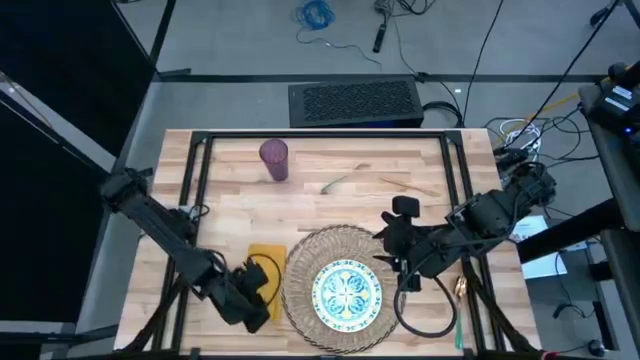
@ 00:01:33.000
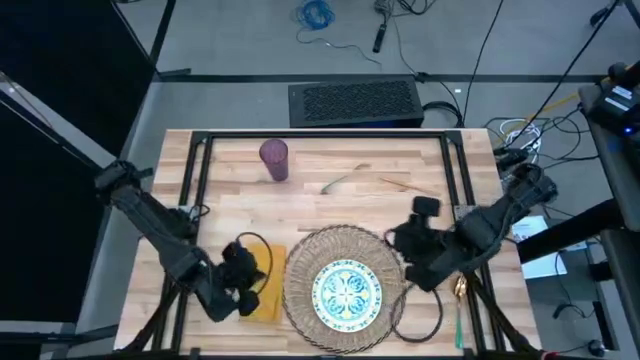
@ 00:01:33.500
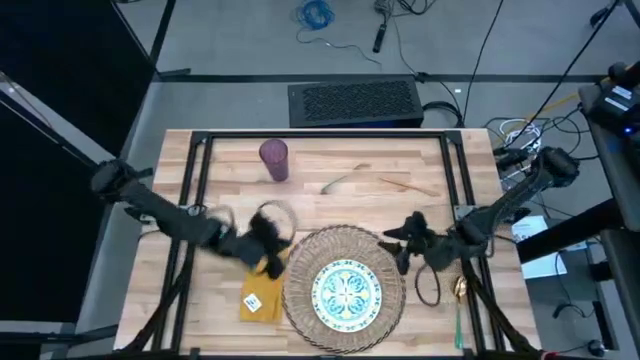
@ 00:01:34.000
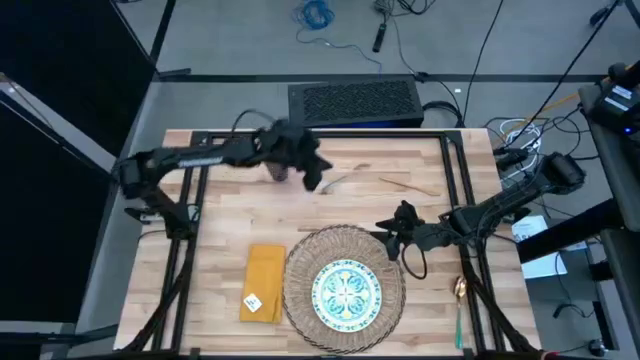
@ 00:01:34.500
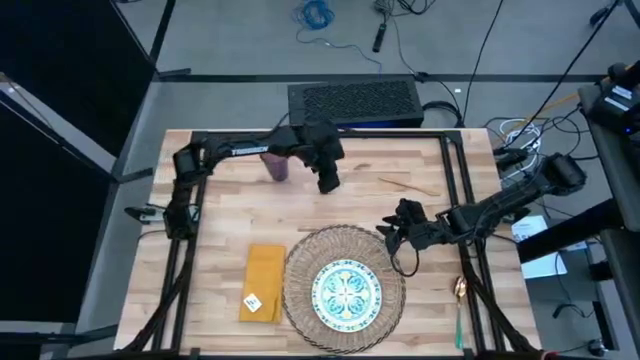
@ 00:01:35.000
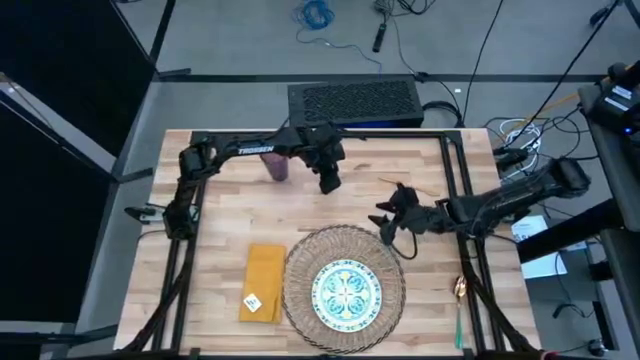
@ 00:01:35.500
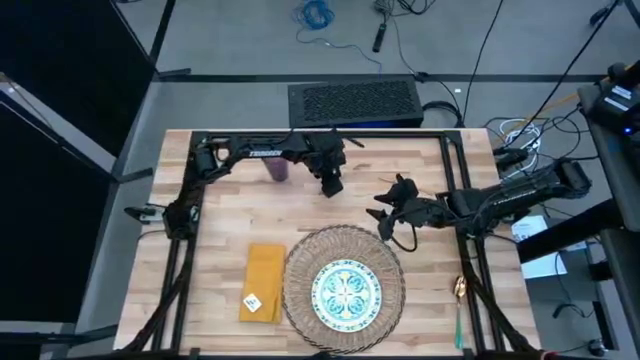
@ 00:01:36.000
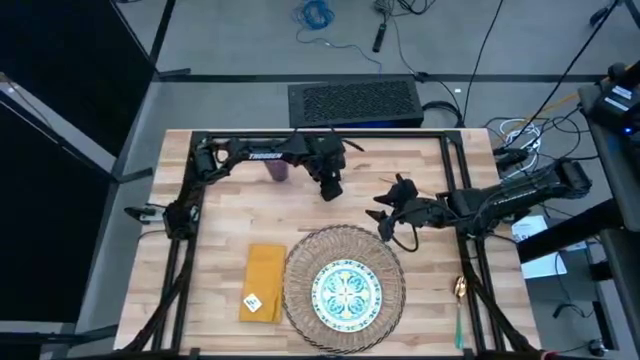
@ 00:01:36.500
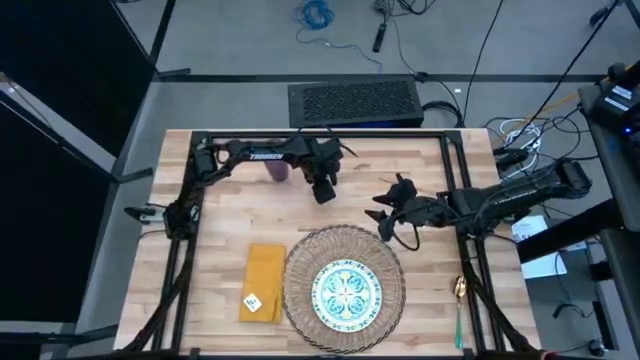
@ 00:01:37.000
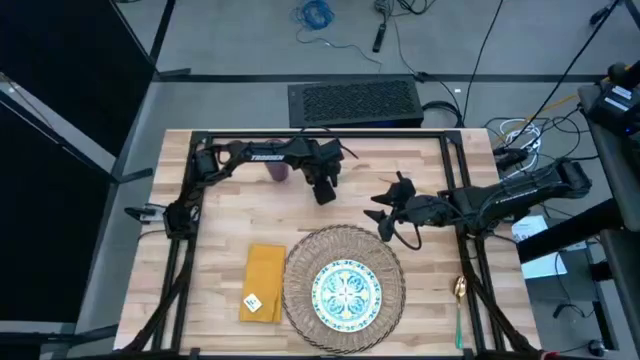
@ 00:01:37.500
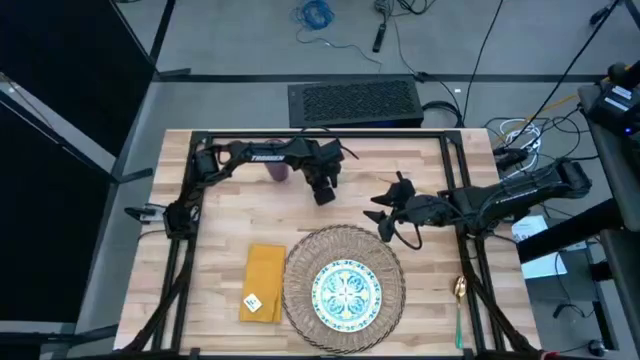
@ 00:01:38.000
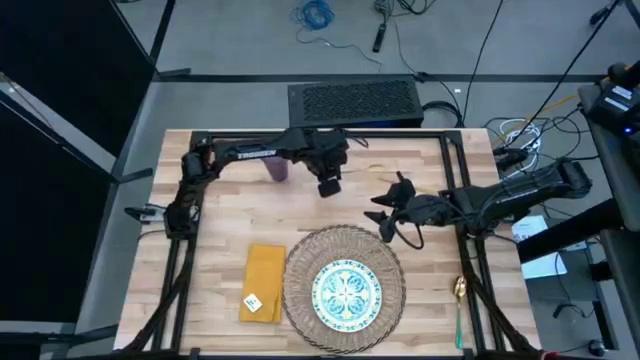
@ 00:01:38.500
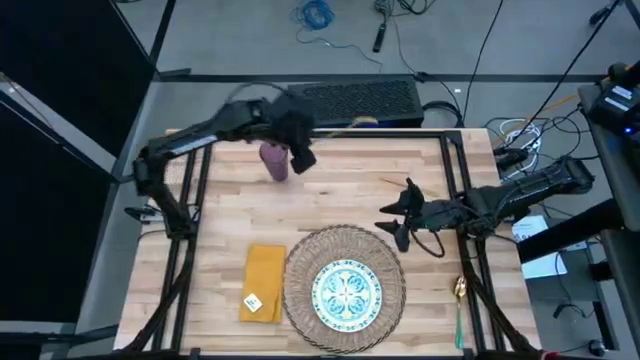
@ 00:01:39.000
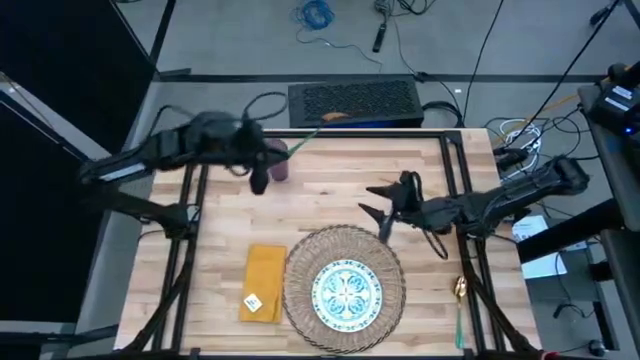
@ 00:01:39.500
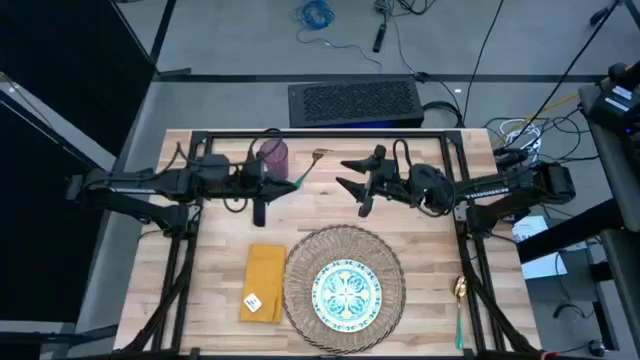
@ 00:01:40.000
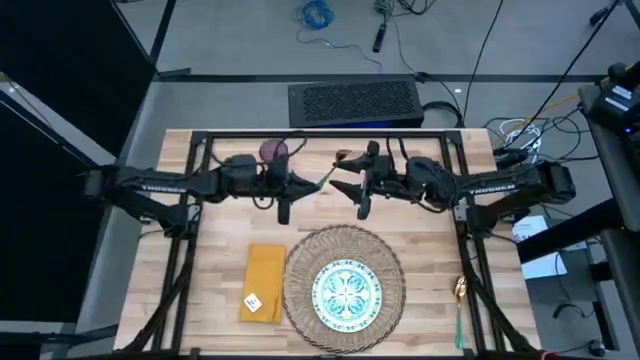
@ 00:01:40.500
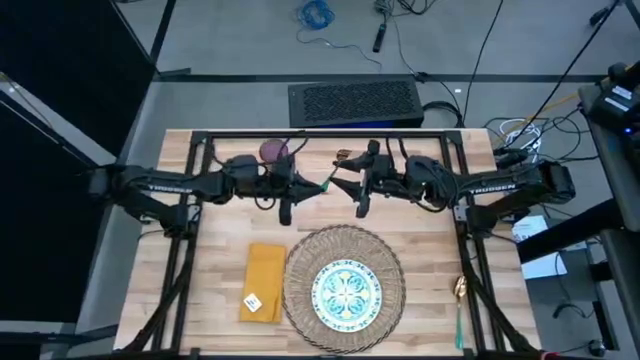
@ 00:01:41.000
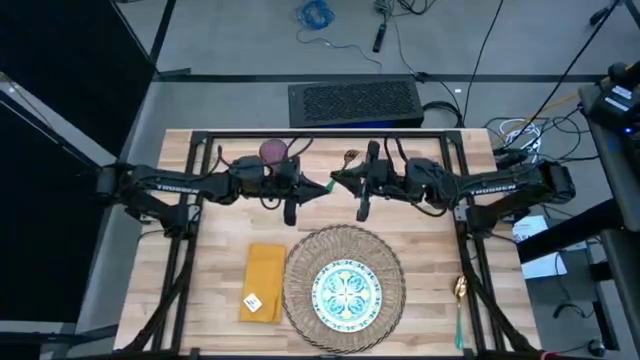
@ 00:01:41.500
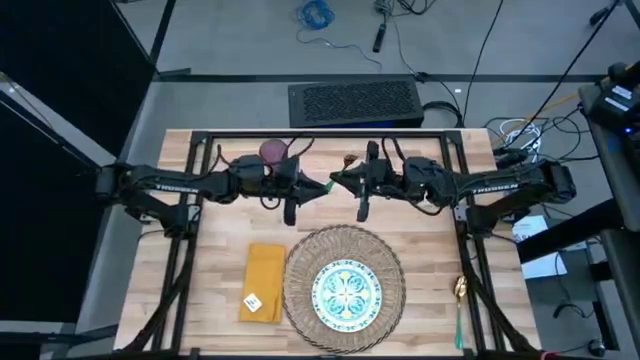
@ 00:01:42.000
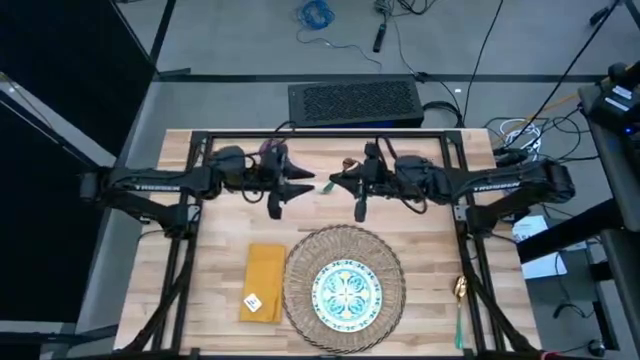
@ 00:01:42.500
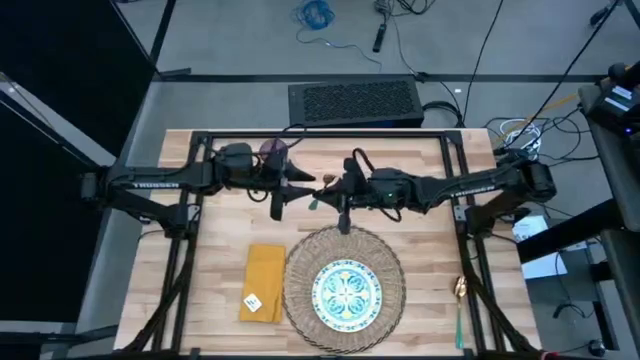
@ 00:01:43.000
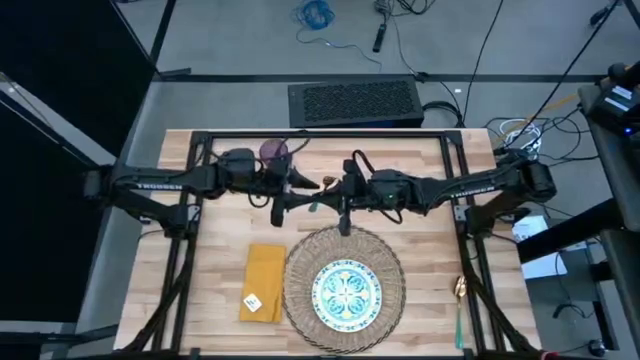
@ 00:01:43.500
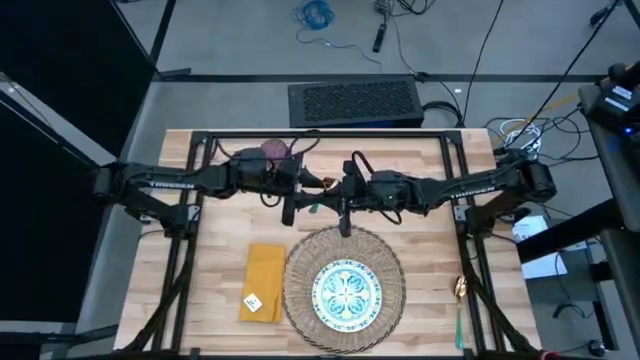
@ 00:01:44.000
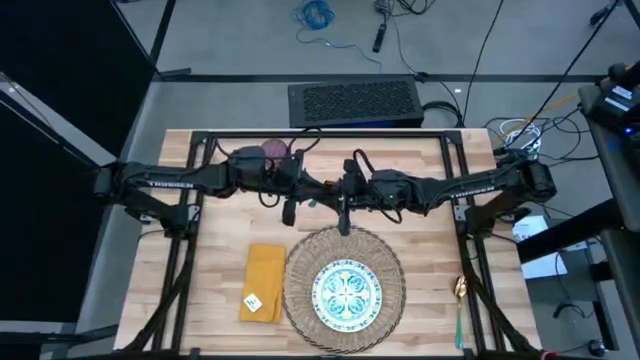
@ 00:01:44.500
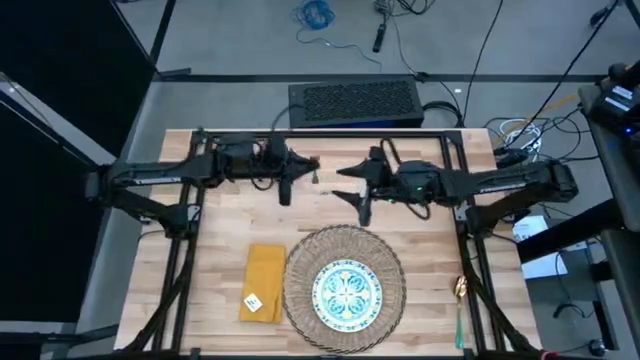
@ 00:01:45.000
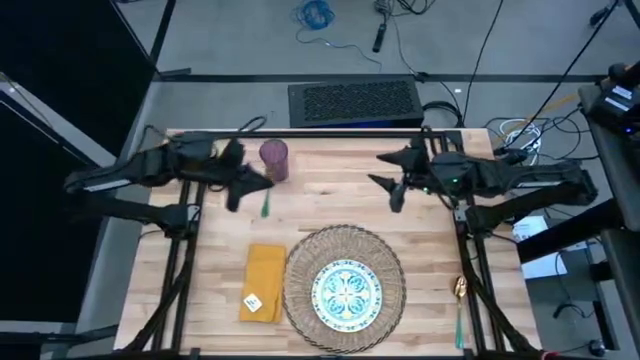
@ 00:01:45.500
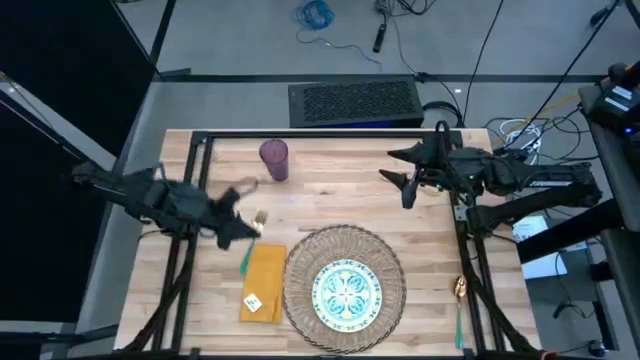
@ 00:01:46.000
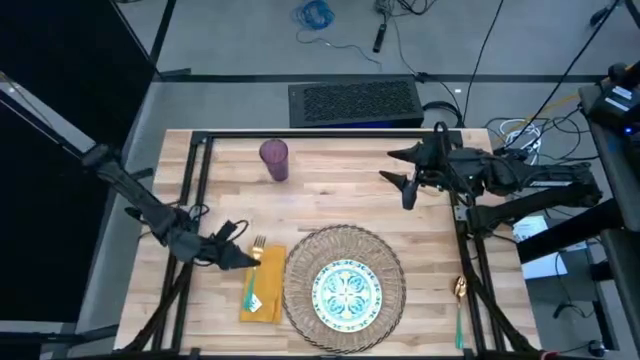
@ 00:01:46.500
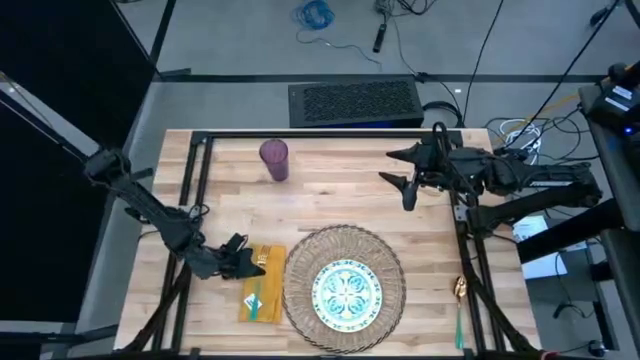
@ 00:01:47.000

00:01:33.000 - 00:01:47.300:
Task: Set table place
Put the green fork on the yellow table napkin

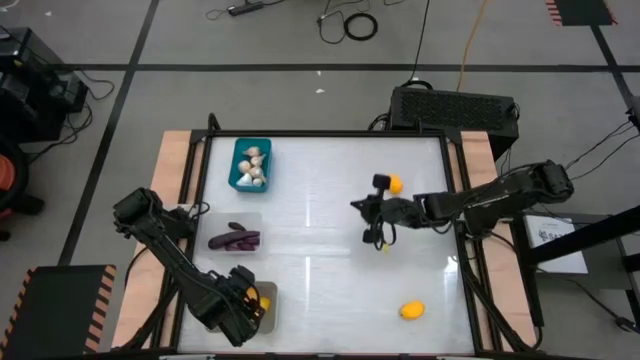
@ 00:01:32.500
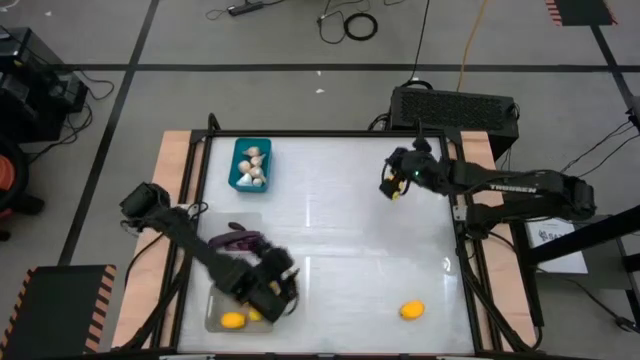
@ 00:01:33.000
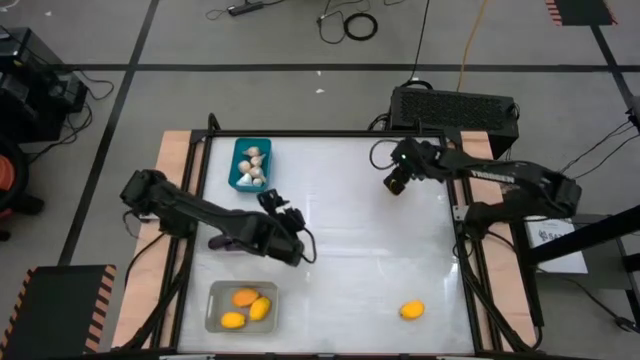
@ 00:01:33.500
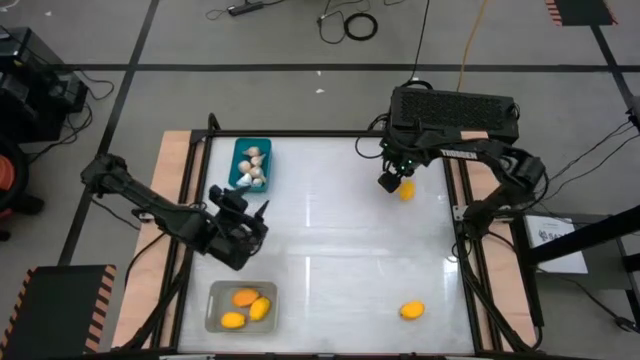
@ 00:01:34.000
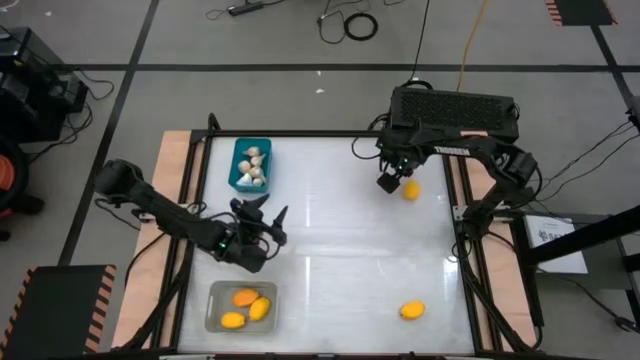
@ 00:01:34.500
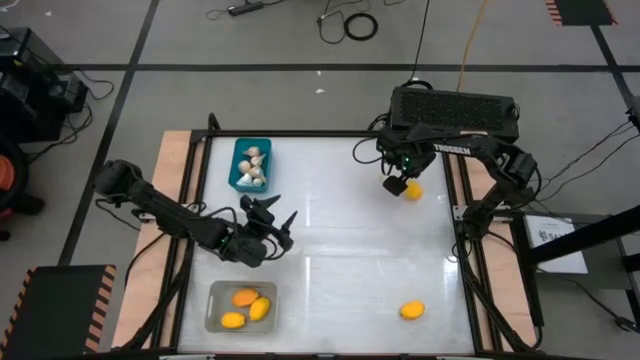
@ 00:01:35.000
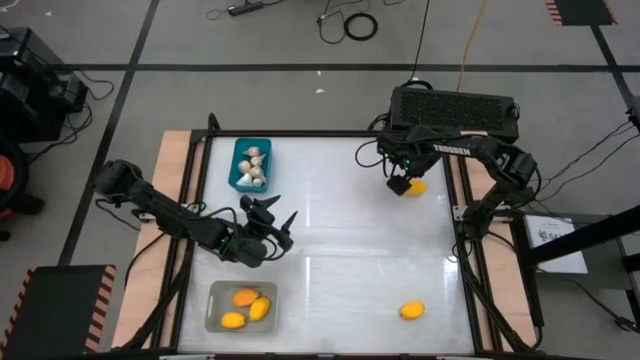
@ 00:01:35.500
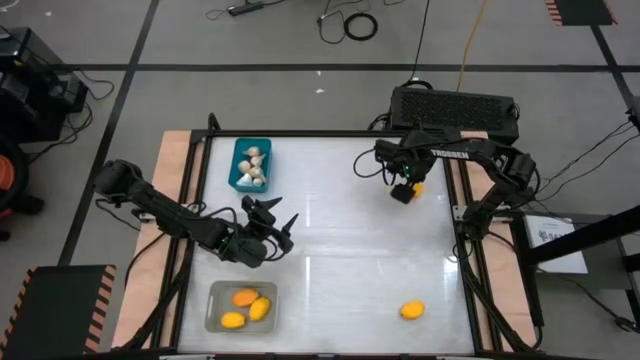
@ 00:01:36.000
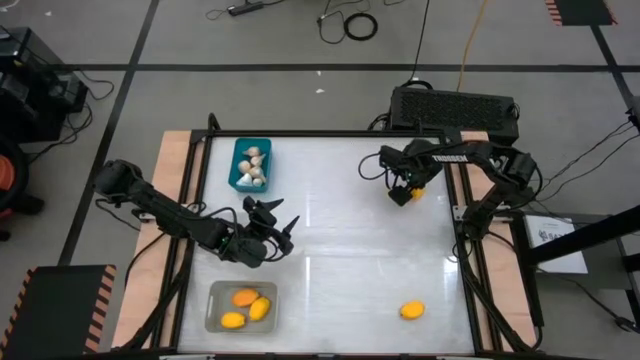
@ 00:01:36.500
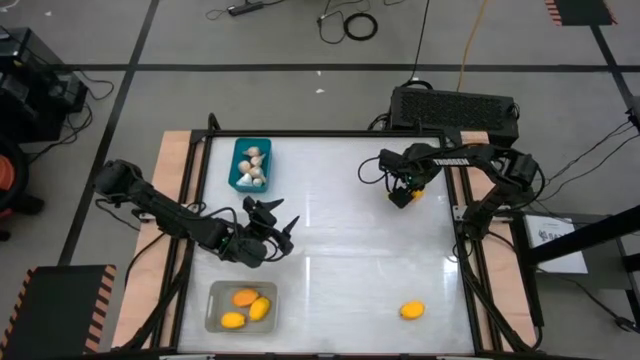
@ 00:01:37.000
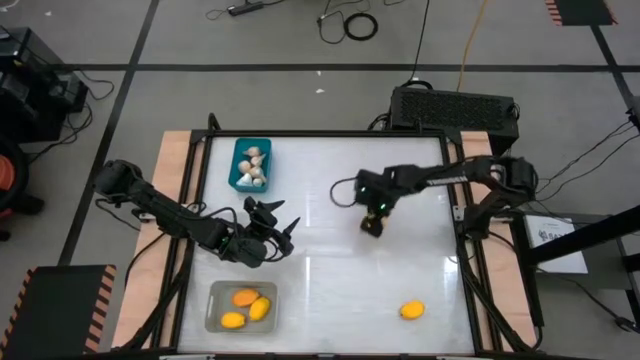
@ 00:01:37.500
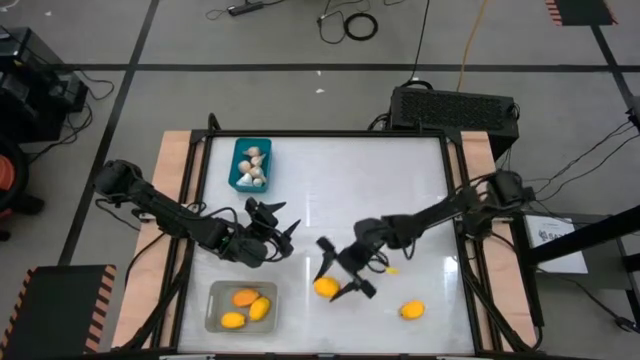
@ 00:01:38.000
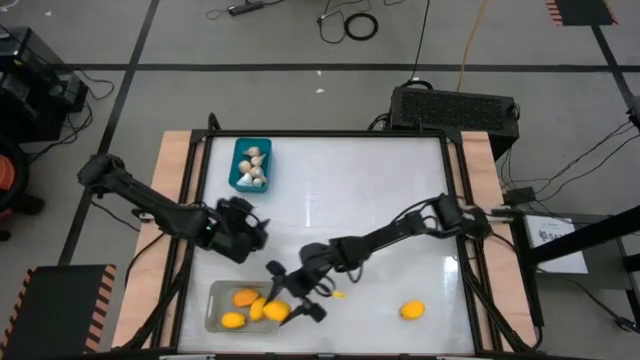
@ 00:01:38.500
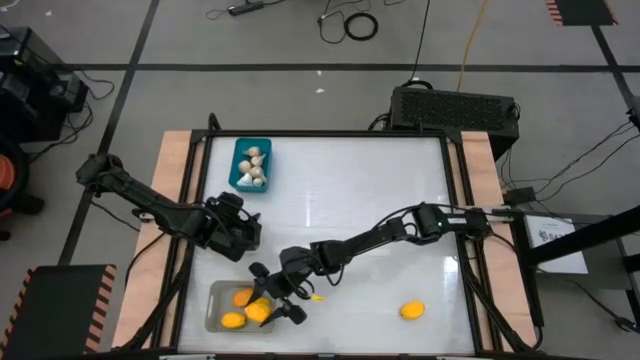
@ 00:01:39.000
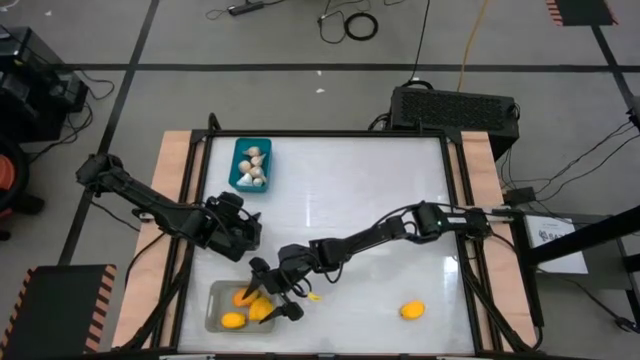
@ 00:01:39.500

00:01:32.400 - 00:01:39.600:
Task: Sort produce into baskets
Put the lemon into the white bin
